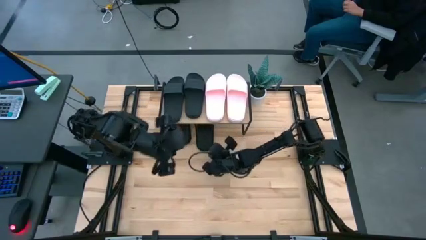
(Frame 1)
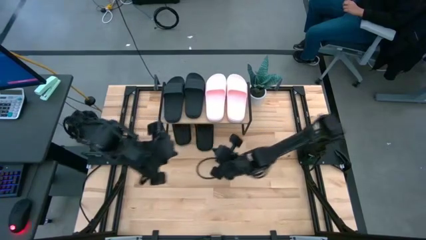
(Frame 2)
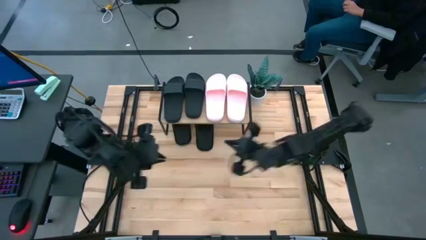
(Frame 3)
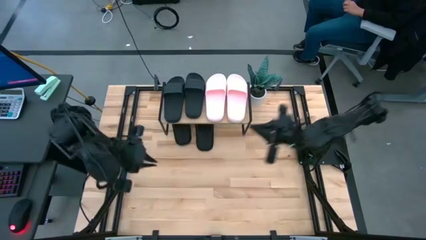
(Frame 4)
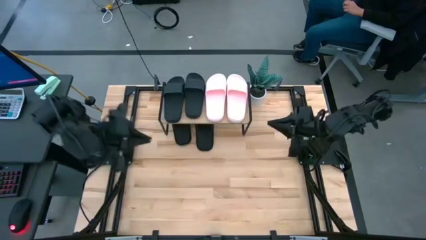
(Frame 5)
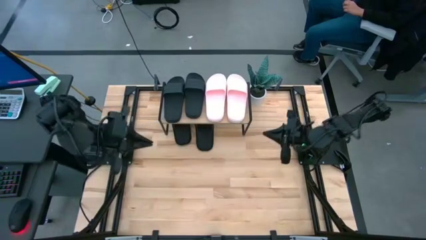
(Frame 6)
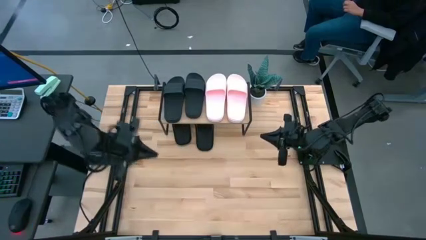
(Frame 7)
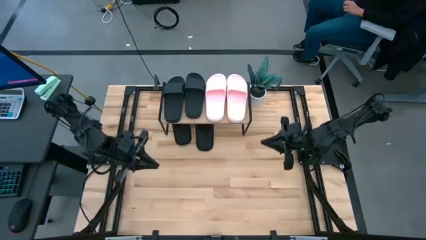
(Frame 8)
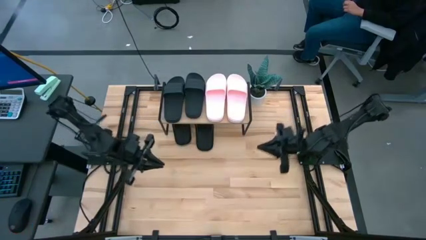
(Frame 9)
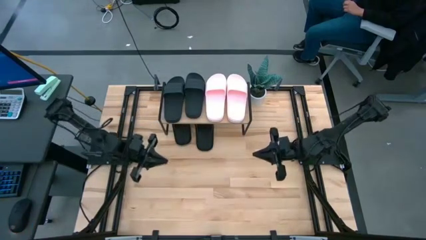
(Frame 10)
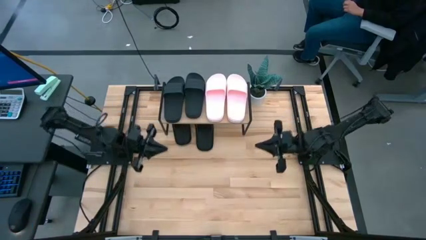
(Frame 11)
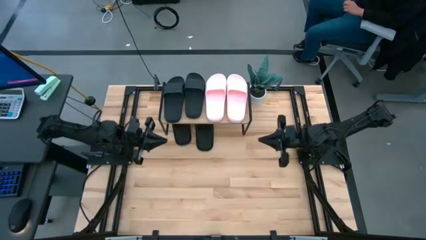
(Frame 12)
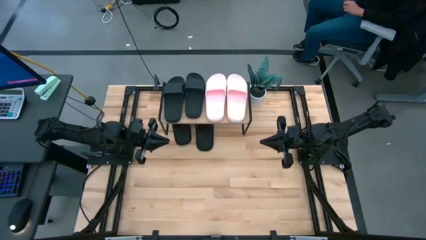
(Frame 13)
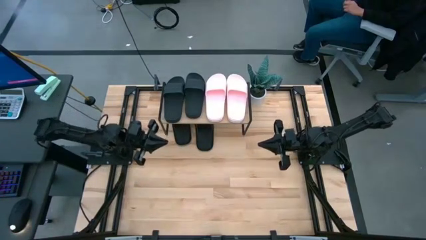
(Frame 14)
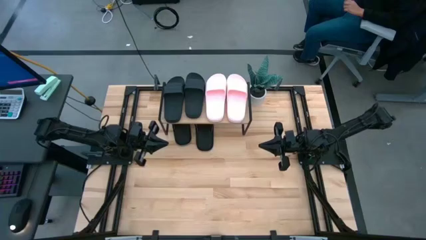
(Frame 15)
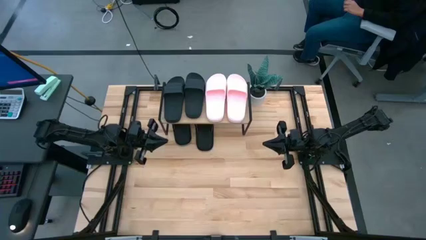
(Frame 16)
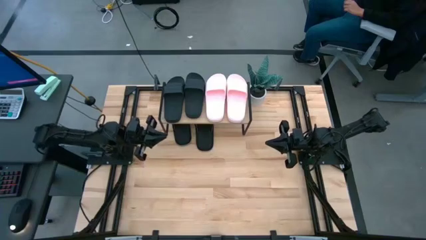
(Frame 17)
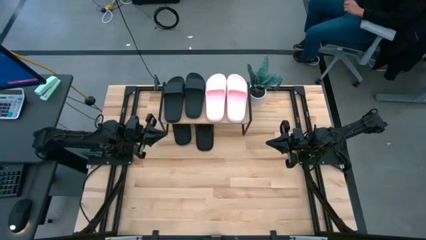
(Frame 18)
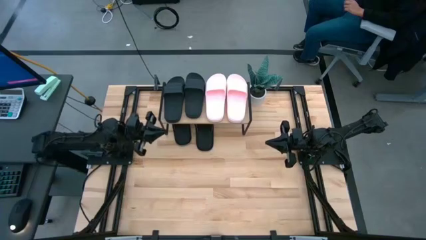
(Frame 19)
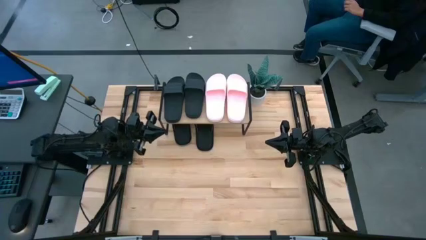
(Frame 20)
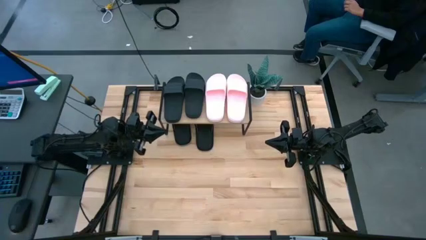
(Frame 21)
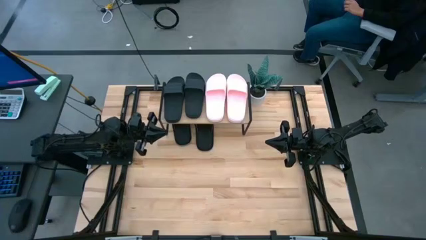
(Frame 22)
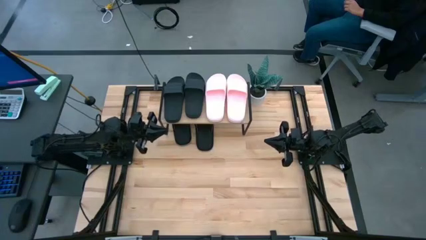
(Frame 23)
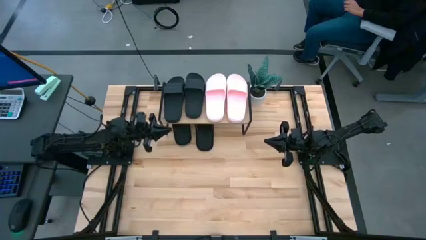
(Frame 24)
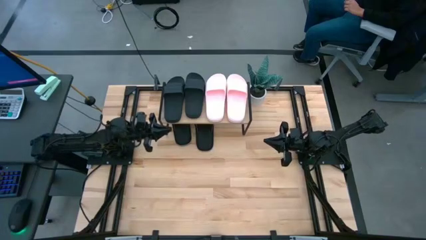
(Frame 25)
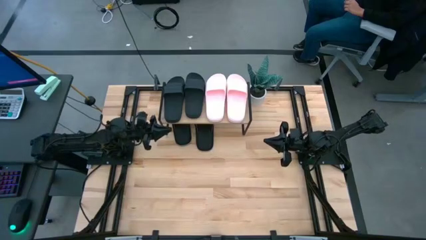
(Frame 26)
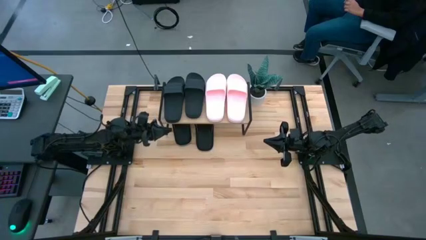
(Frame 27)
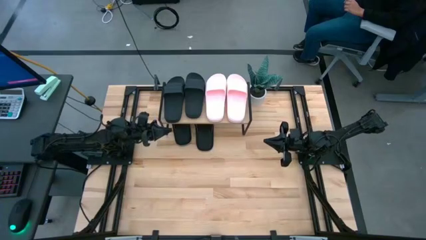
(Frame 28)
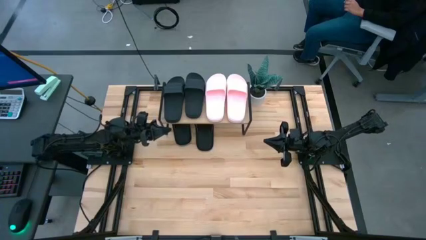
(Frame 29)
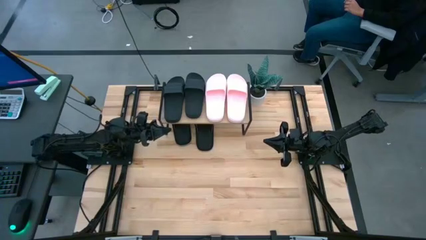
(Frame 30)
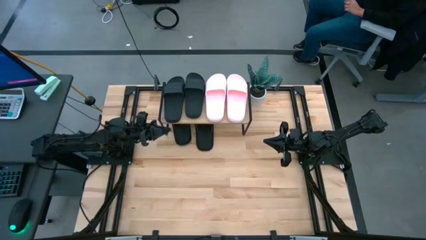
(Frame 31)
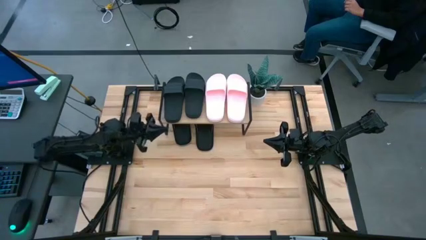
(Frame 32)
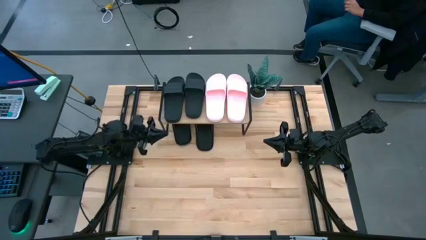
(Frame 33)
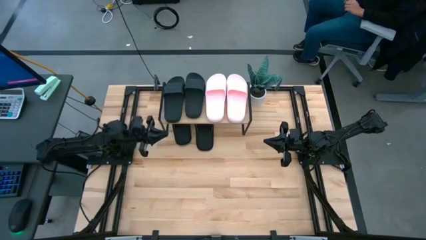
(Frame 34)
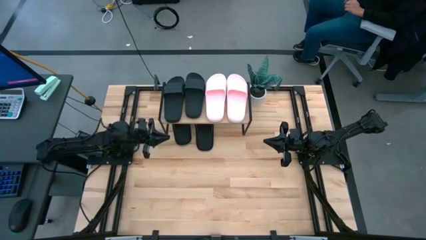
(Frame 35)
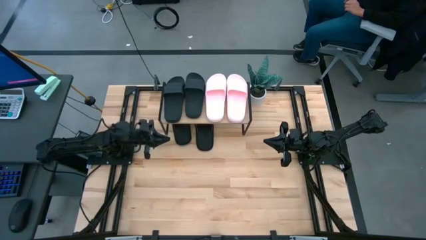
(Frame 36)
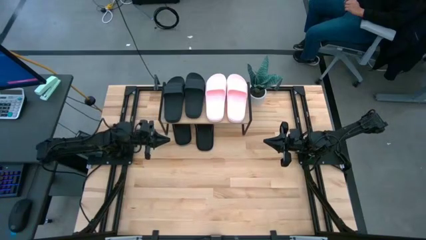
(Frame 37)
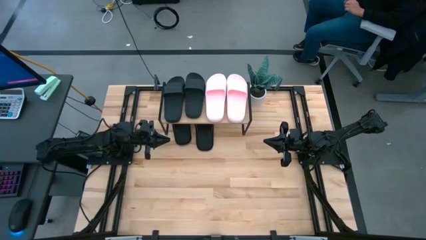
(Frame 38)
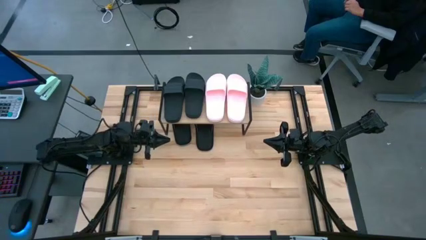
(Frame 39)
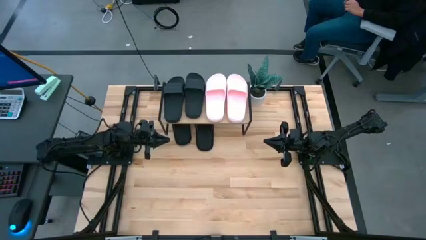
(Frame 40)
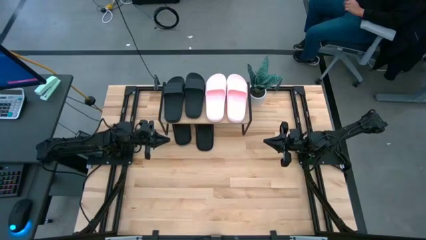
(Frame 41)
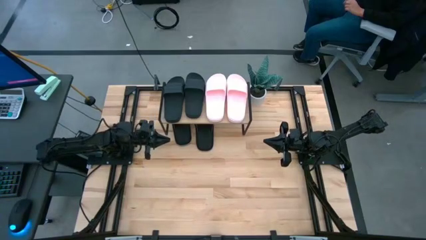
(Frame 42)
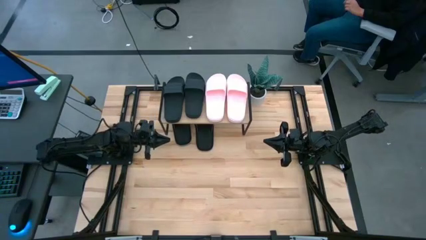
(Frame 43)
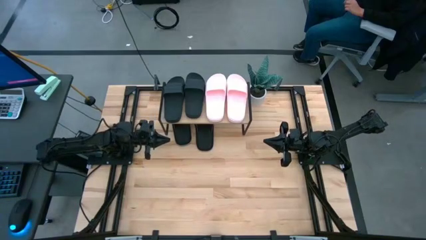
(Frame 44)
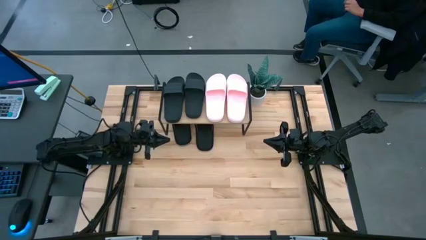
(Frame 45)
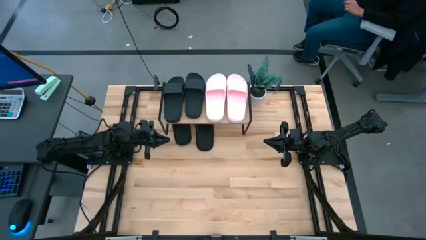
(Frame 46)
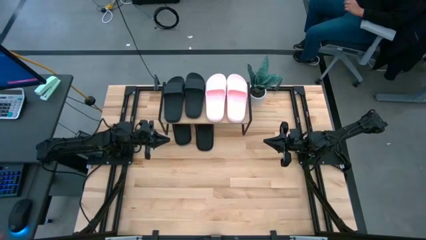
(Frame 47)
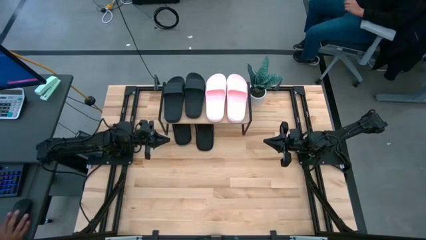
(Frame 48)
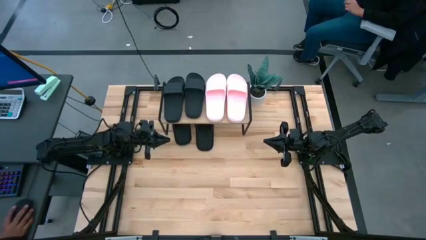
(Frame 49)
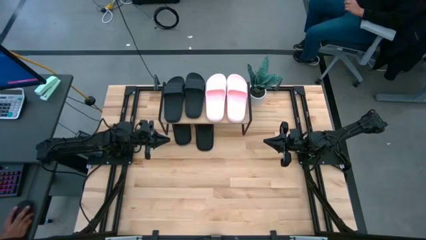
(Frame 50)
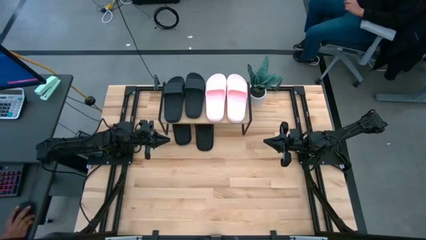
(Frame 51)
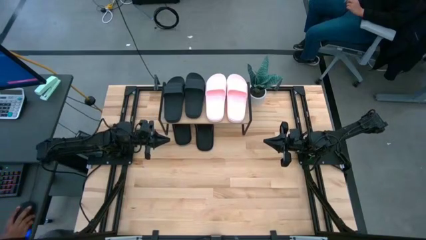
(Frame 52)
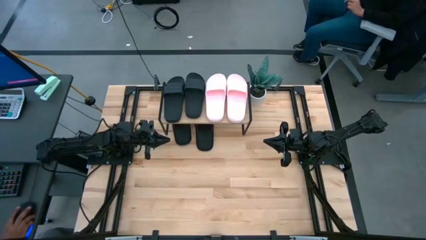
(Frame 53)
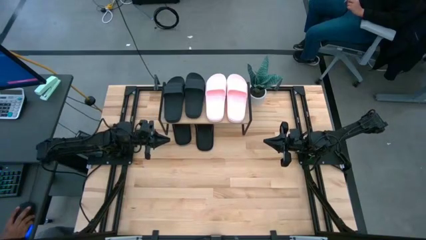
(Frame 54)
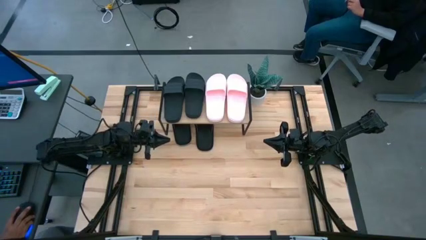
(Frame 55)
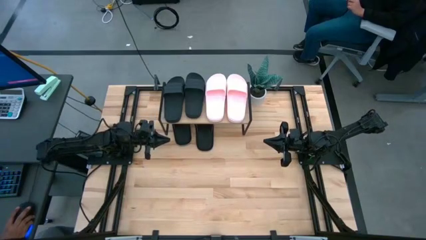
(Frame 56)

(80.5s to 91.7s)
Task: Pick and place slides into the shelf
Return to home position

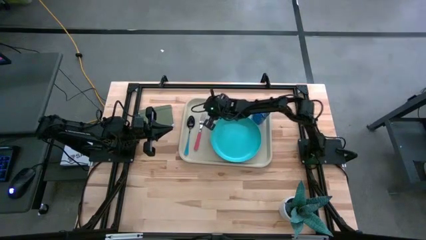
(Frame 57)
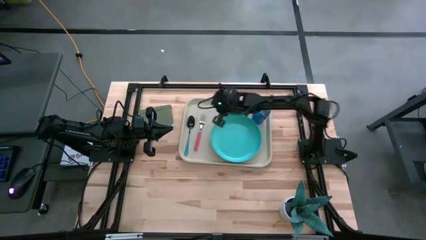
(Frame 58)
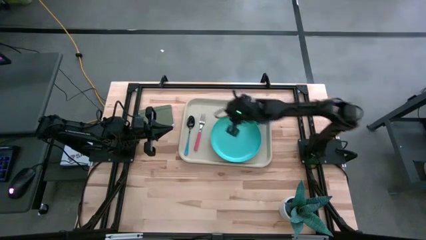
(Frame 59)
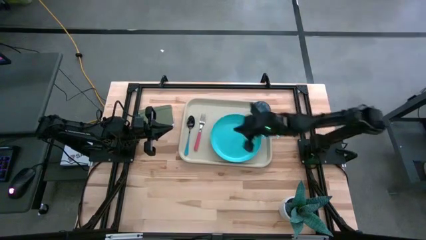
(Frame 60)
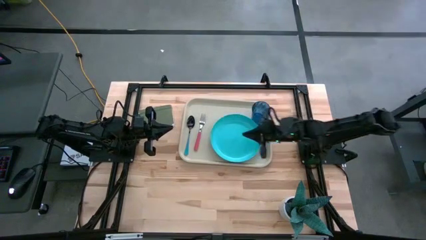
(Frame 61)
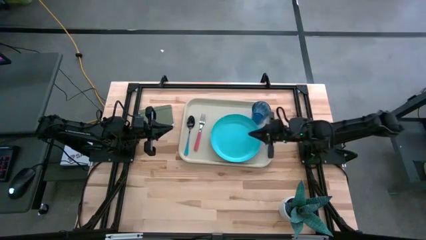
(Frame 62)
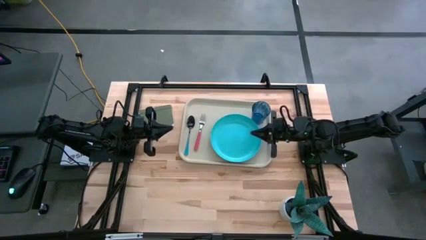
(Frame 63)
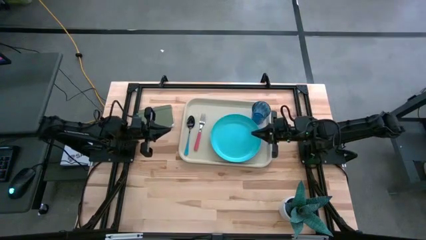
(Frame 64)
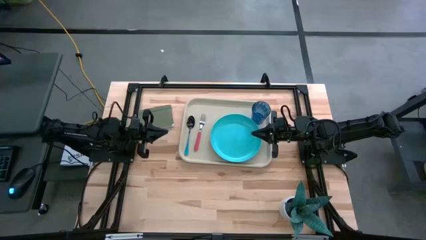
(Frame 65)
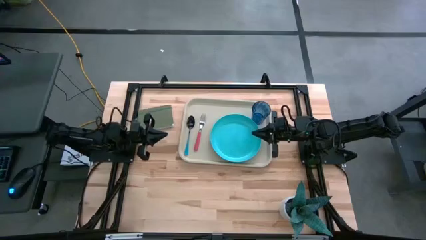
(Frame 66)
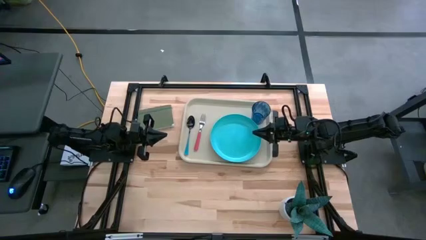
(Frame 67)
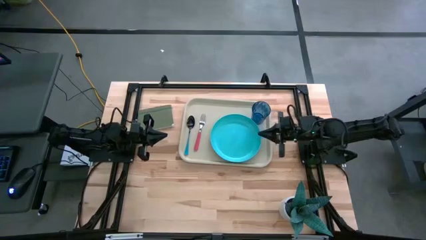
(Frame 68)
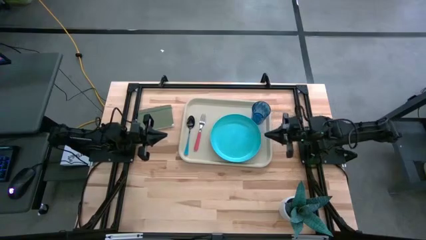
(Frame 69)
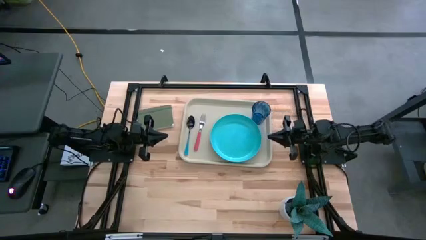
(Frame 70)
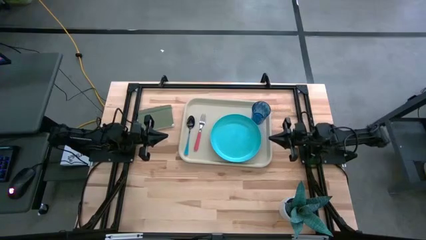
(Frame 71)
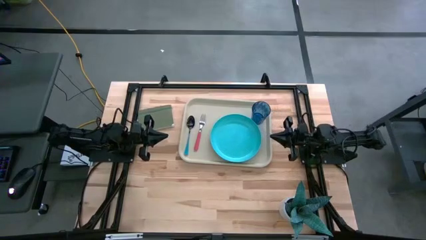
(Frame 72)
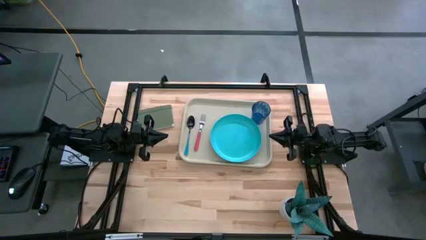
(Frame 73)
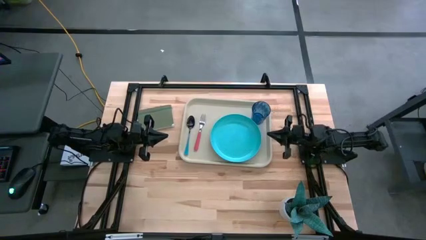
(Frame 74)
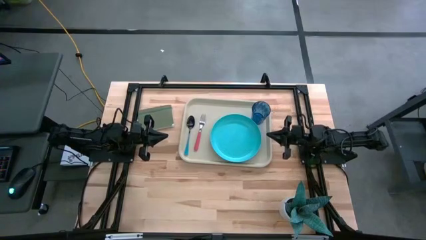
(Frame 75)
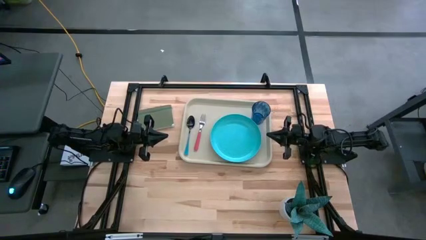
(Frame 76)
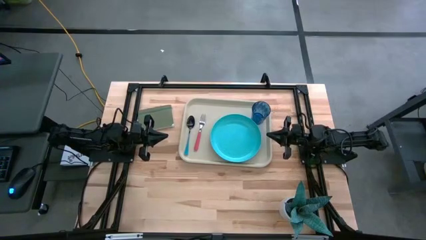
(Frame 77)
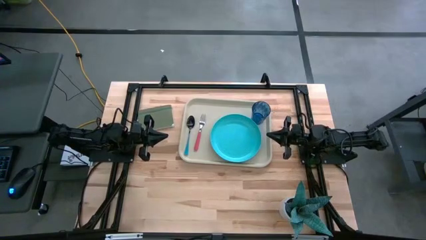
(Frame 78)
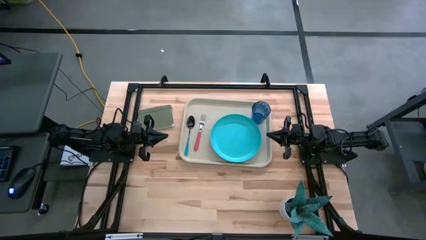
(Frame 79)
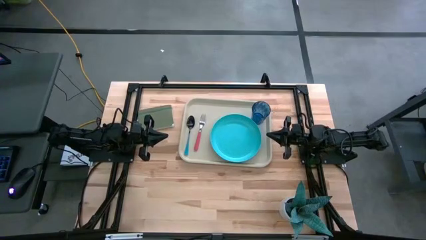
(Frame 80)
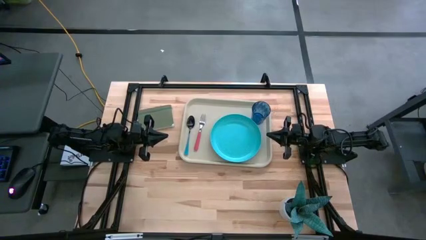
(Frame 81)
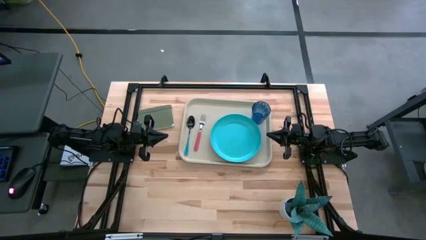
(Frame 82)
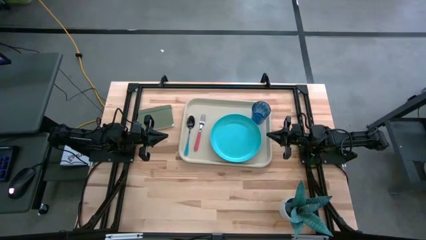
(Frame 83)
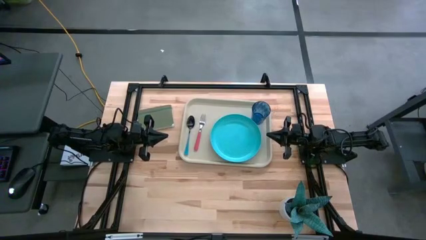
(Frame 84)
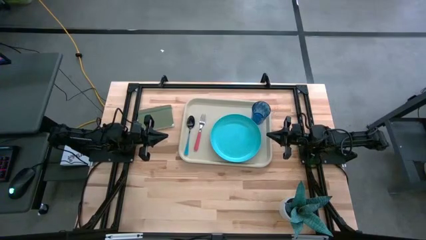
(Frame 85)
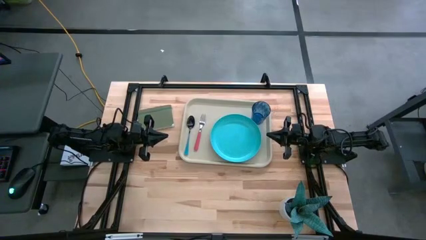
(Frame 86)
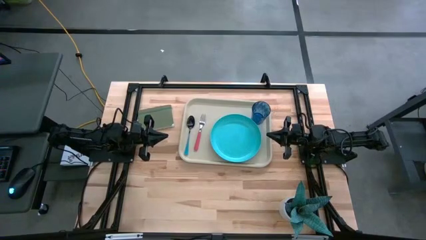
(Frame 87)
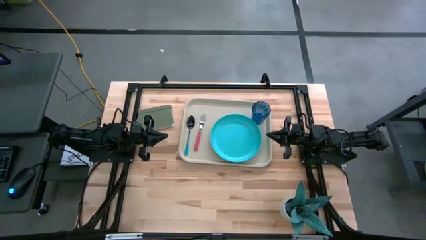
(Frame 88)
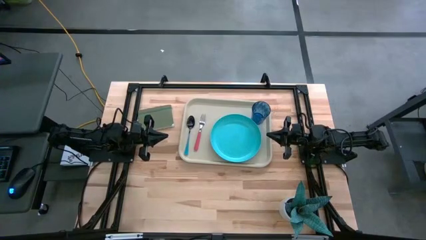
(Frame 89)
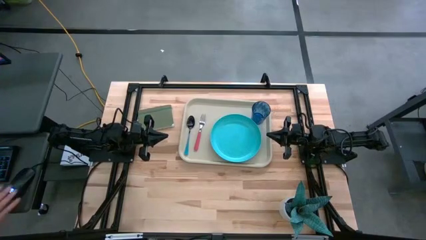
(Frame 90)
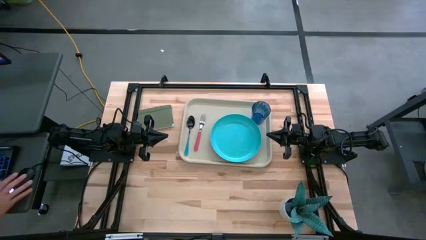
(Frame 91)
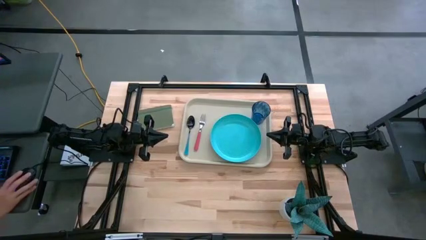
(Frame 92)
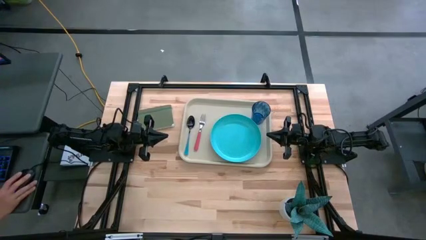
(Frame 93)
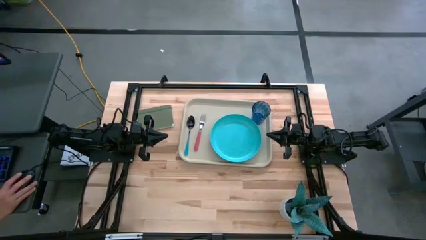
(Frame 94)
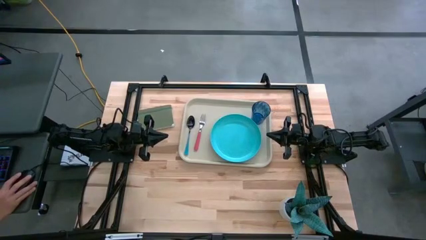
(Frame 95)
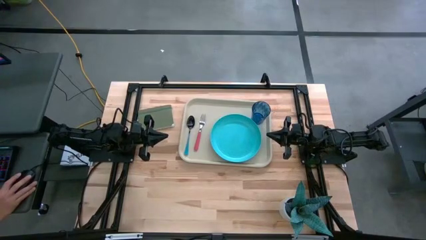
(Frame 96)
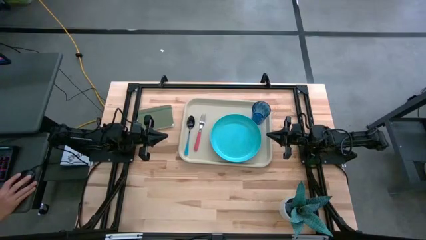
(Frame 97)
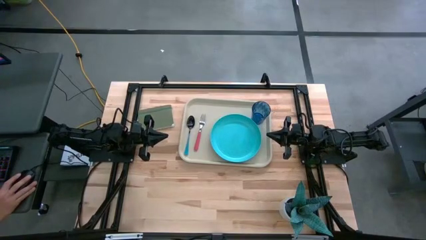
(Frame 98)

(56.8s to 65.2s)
Task: Pick and place plate/cup/fork/spoon on tray
Return to Home Position
